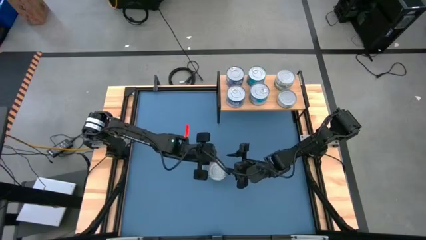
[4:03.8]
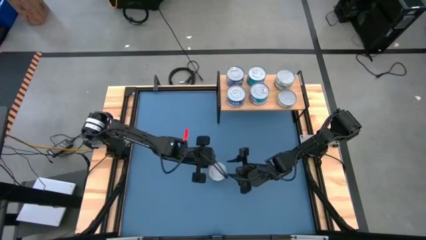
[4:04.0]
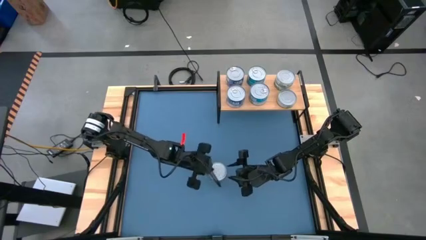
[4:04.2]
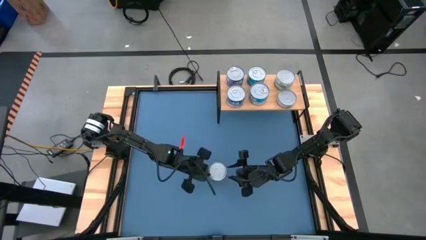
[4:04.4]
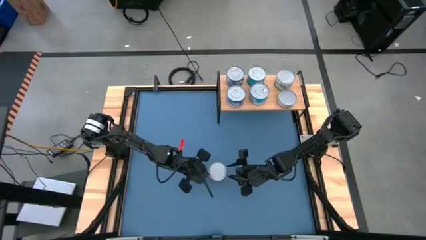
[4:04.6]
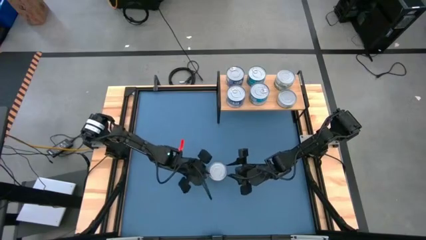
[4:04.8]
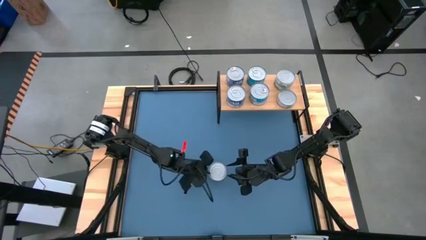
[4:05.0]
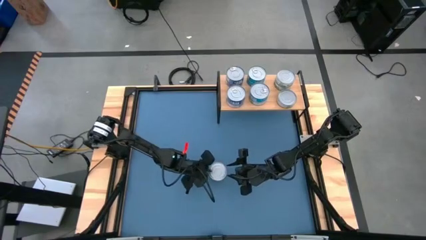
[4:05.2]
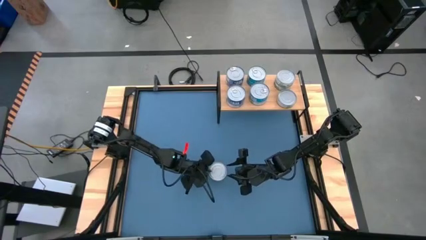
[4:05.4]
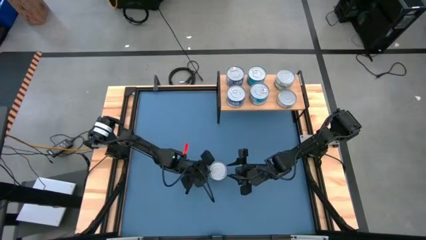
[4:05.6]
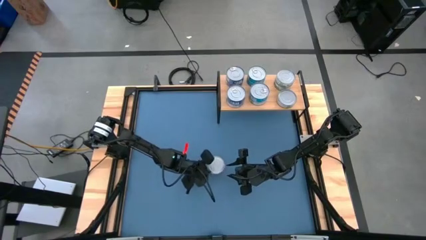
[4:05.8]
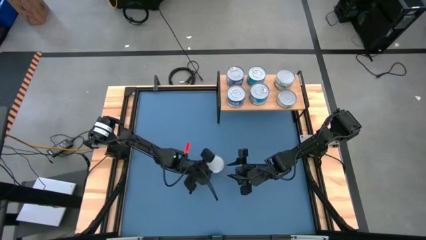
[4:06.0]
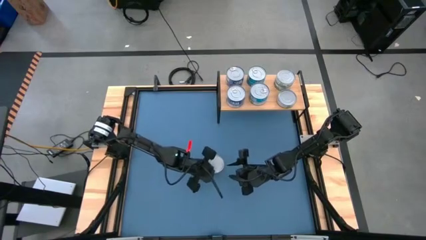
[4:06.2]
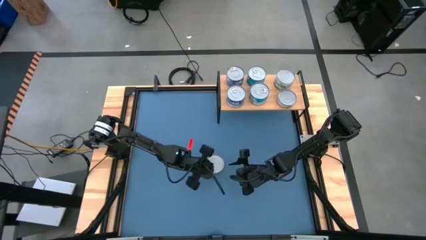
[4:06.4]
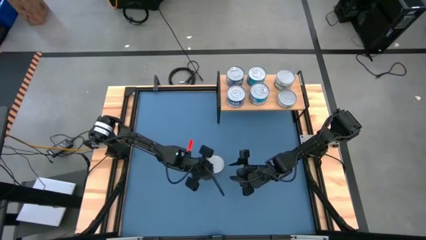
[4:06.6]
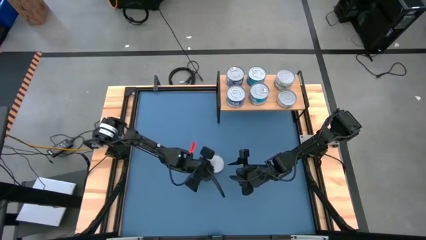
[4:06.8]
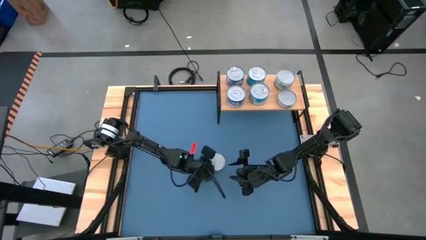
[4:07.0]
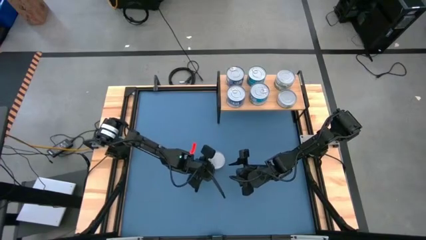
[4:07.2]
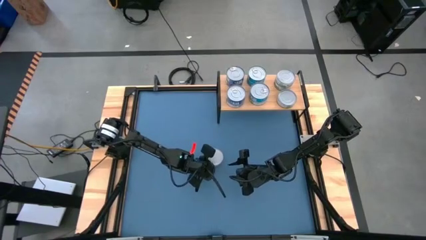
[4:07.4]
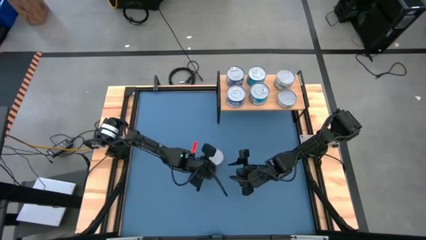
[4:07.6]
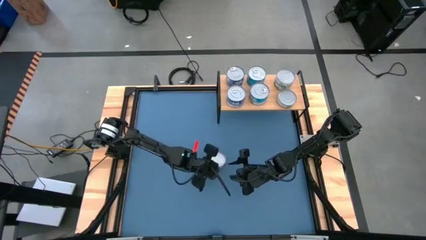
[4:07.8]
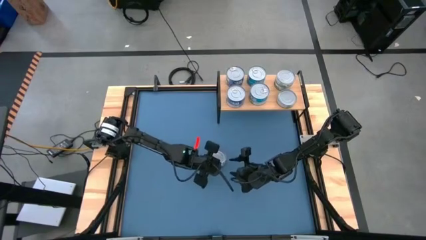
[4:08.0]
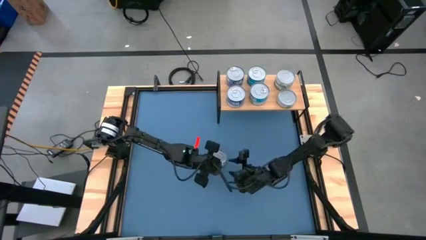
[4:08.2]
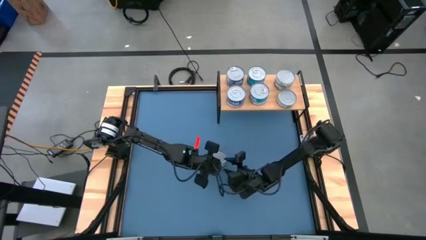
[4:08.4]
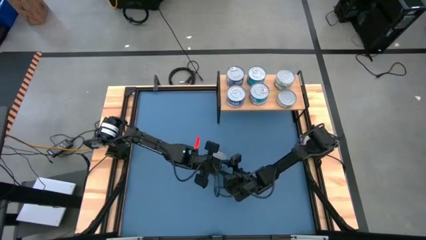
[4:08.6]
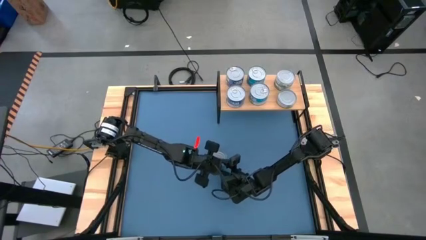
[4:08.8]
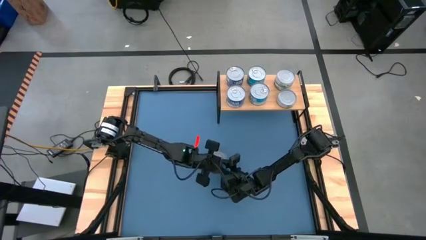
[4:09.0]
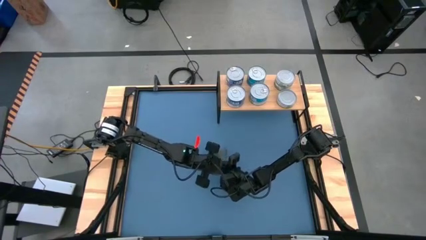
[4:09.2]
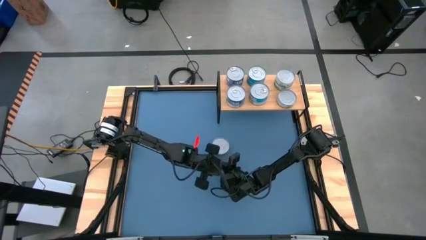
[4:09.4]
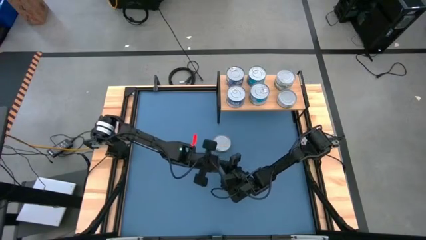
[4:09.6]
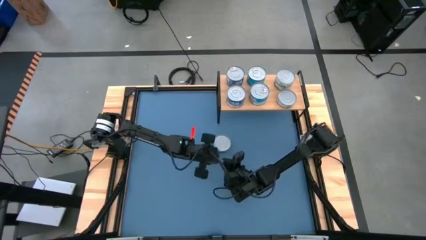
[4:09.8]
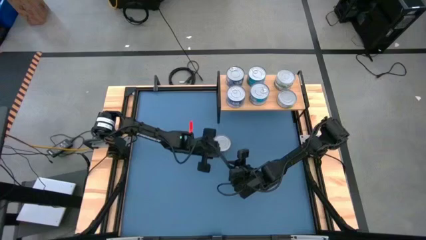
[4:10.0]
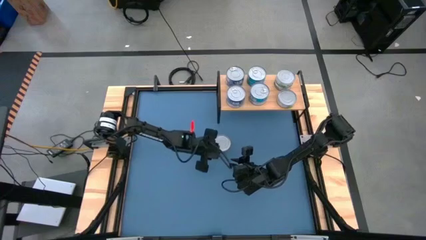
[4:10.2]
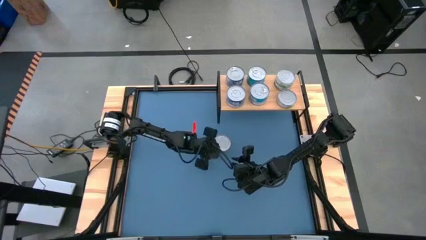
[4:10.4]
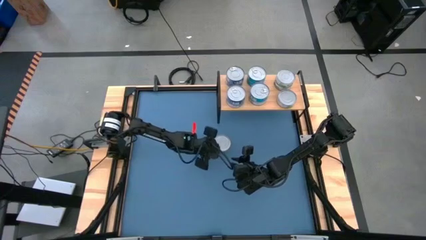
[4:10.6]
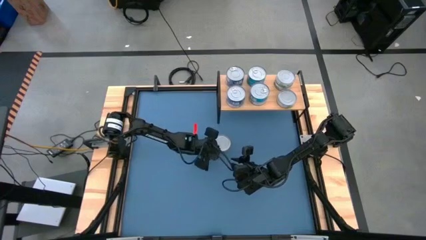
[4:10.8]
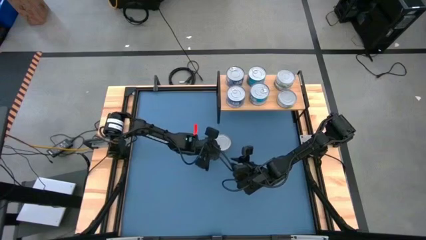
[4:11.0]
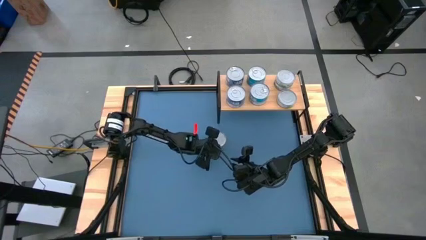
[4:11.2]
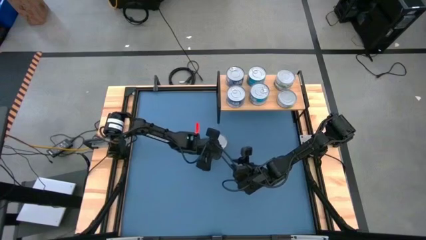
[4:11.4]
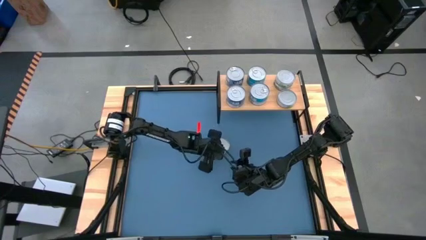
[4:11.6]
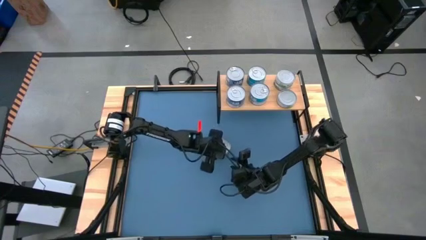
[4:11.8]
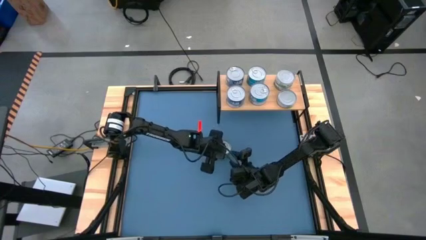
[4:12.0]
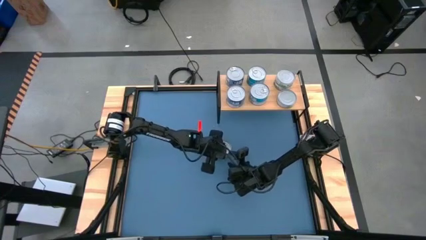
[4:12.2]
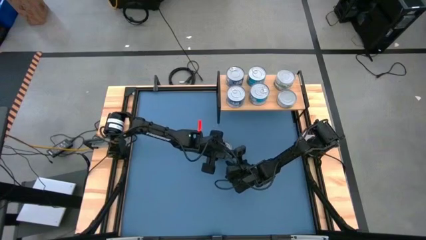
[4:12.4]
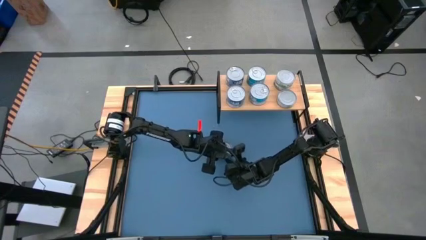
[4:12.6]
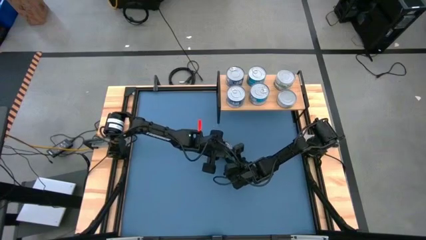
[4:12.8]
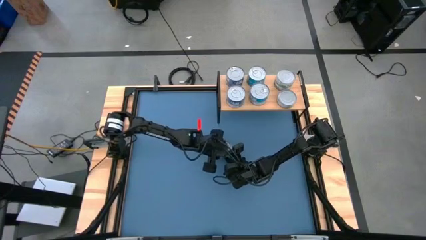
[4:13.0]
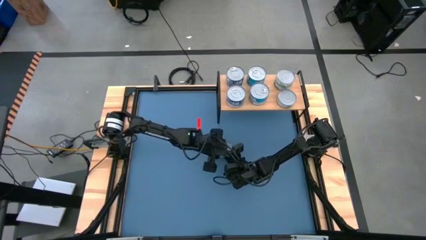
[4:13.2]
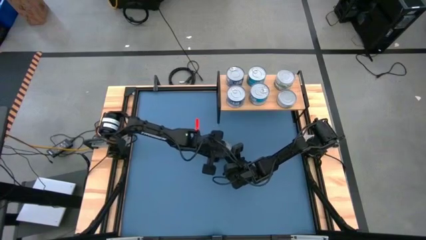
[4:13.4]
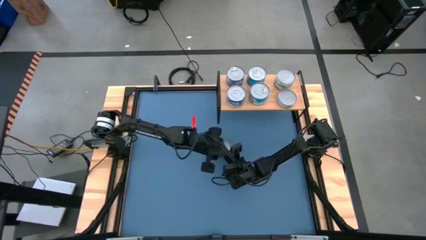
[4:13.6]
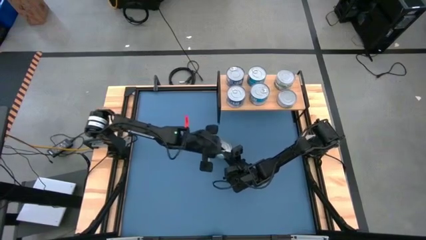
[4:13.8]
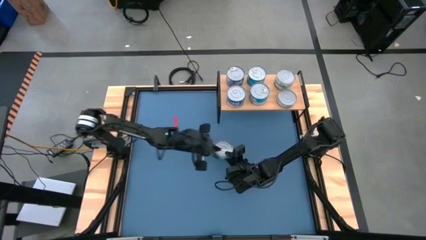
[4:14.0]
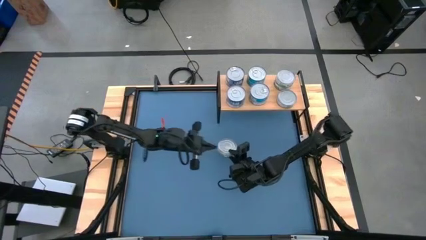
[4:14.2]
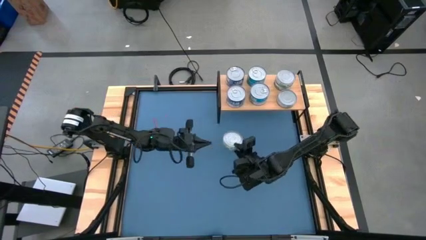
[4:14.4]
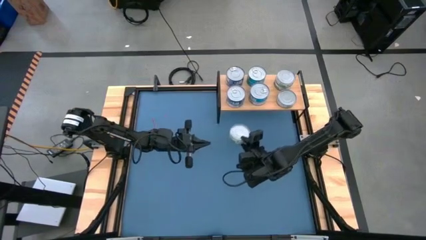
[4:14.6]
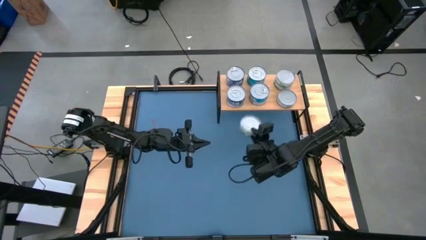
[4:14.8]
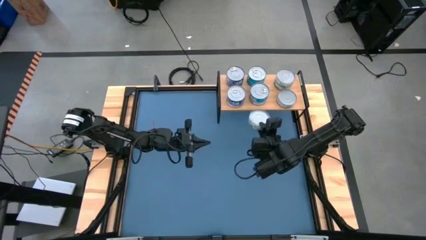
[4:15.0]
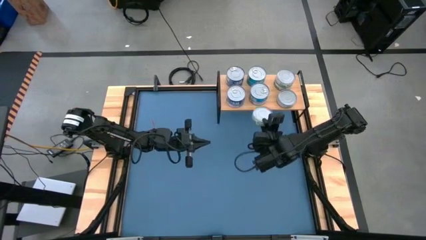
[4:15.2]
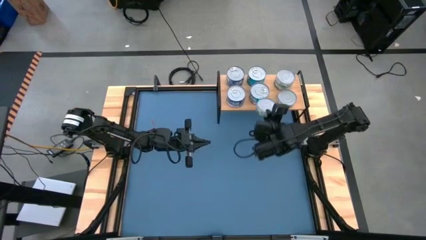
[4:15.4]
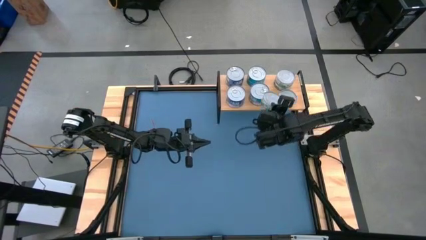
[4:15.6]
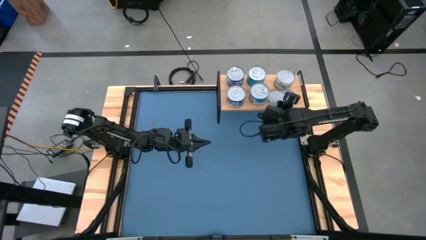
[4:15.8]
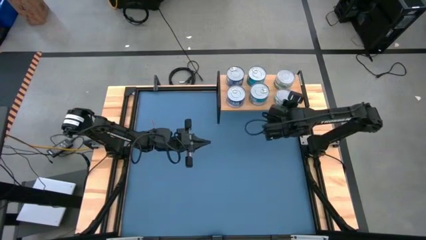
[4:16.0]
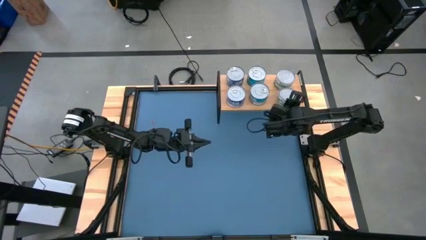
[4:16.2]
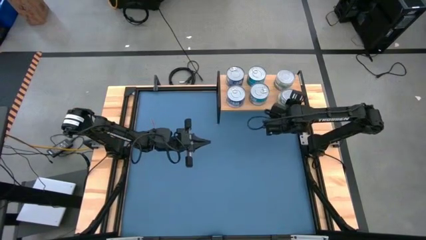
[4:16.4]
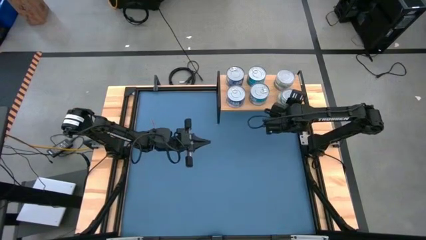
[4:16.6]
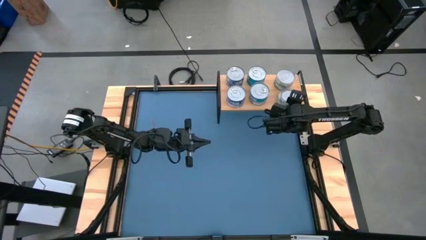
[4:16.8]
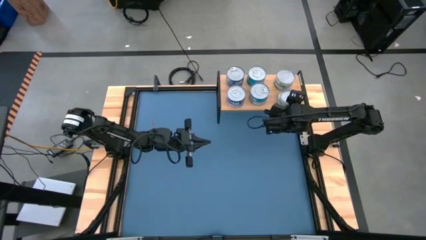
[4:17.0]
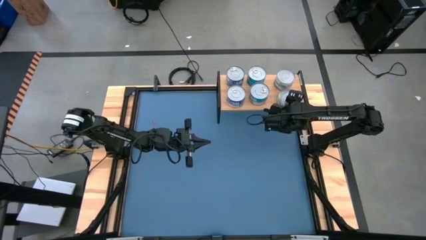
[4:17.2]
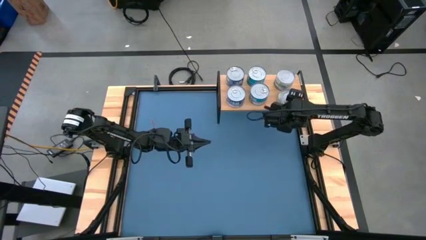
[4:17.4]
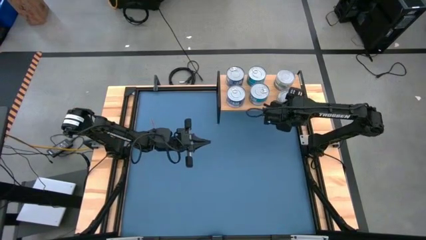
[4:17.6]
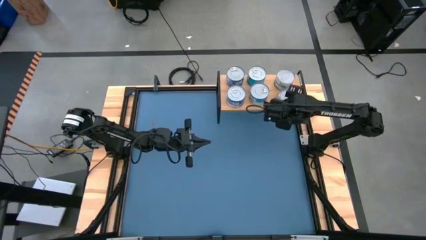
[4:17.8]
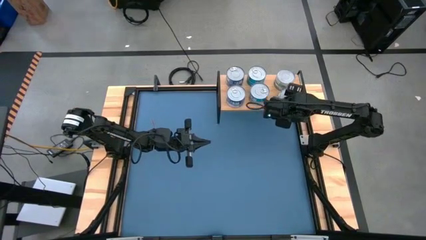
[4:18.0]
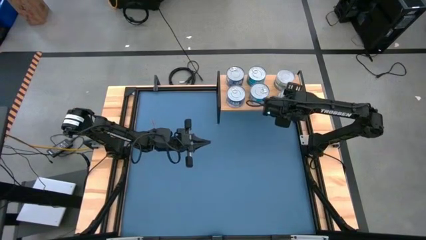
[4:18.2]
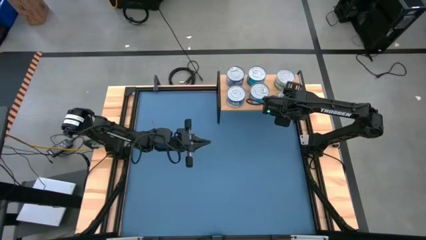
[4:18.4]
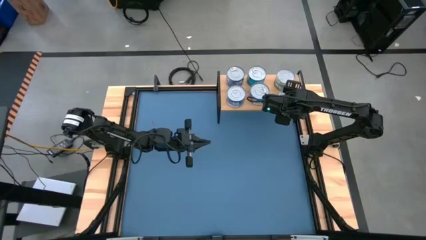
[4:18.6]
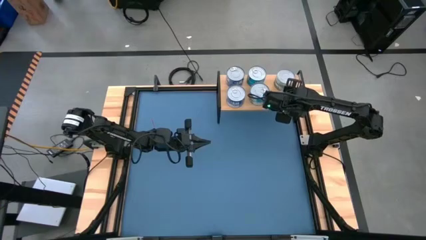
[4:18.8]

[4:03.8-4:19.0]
Task: Stack canned seafood by type on shelf
Stack the green tuna can on top of the green tuna can on the shelf

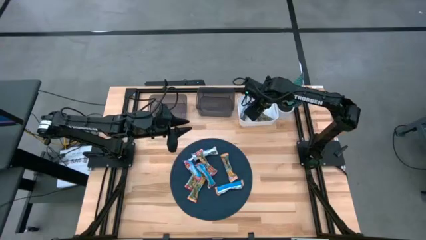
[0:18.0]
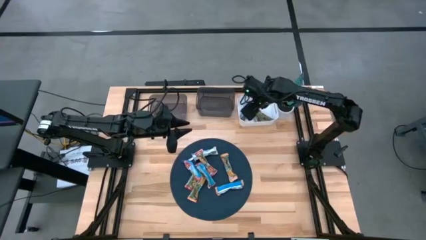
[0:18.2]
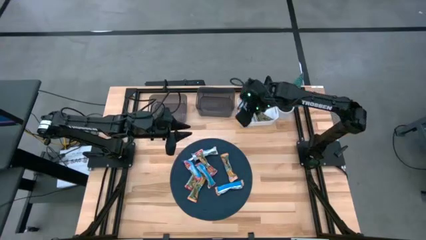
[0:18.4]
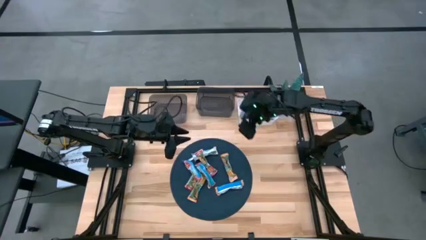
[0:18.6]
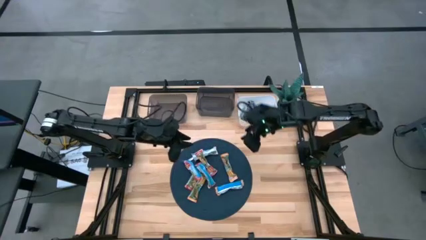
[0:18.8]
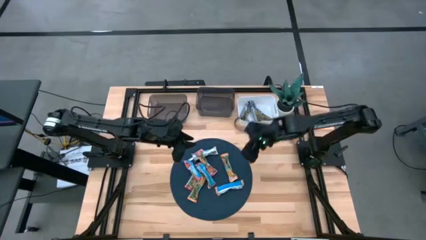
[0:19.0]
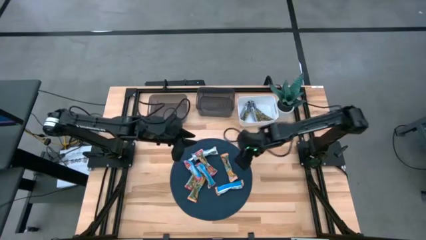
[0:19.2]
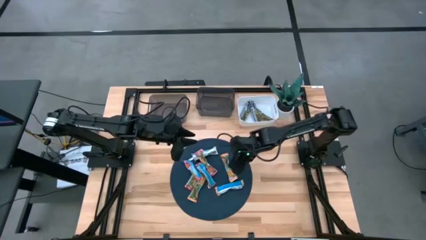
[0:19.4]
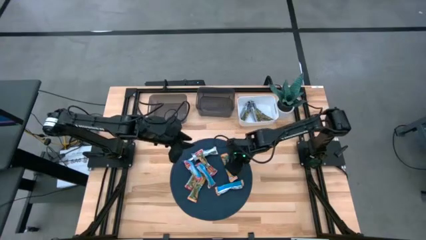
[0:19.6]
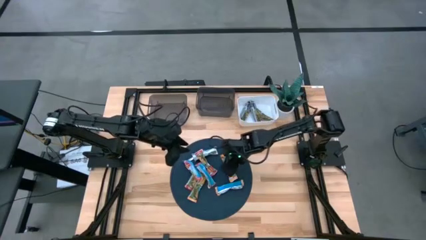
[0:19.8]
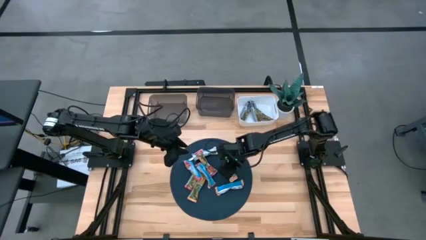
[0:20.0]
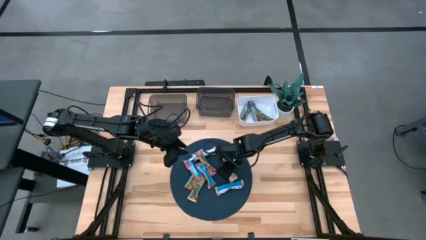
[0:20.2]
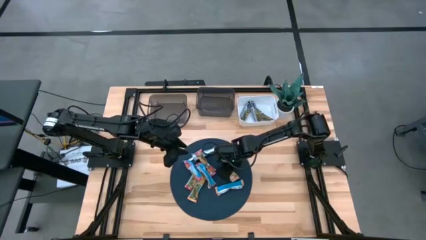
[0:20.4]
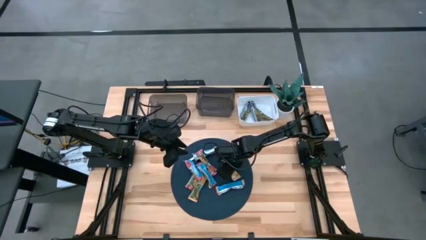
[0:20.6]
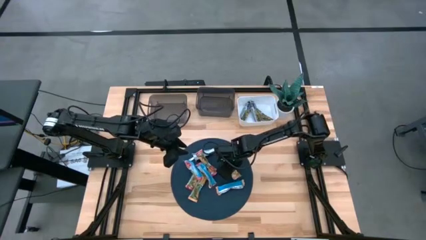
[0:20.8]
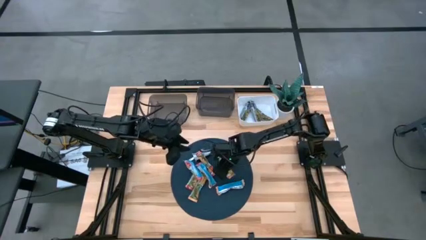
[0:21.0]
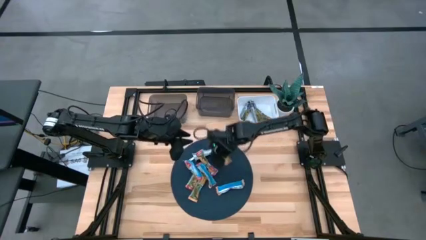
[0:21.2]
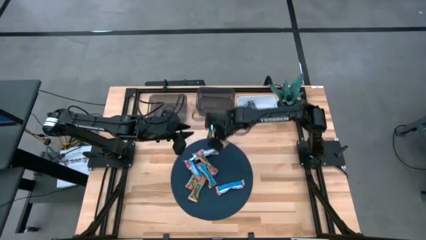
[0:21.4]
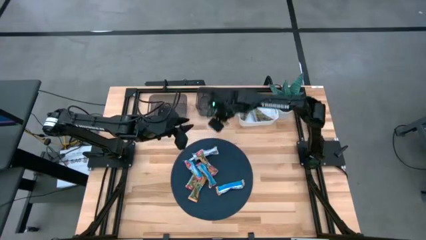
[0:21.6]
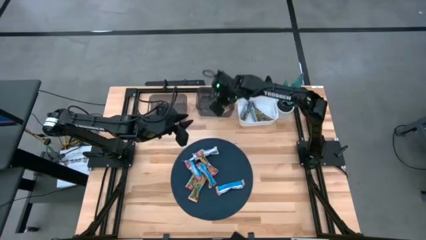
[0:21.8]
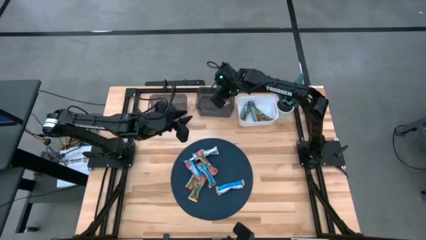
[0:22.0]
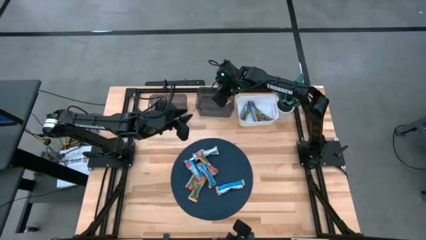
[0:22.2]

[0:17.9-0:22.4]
Task: Pick and place Granola Bars by type
Put the yellow granola bar into the right black bin
